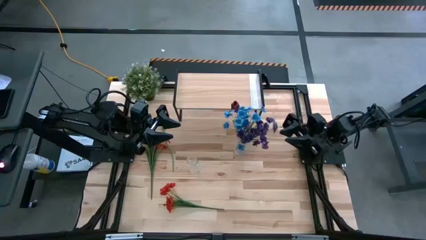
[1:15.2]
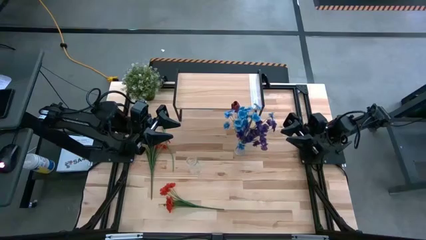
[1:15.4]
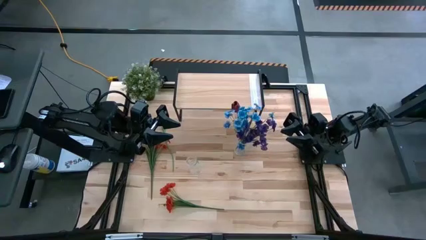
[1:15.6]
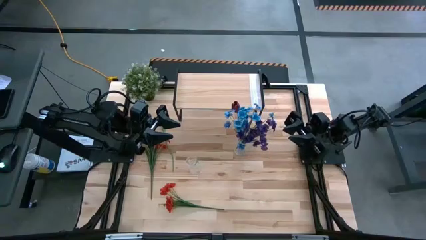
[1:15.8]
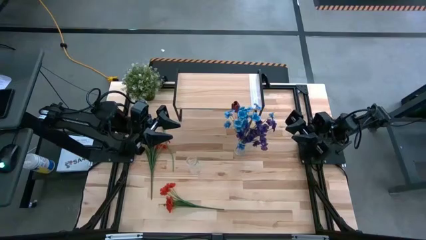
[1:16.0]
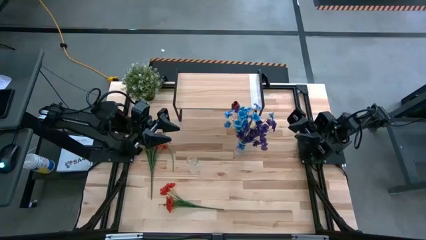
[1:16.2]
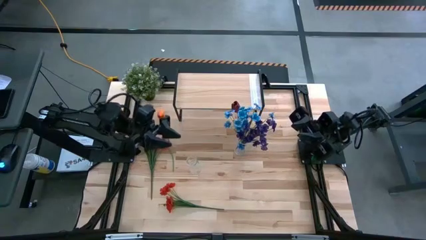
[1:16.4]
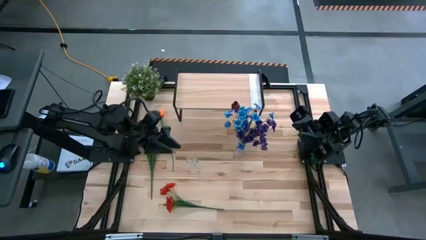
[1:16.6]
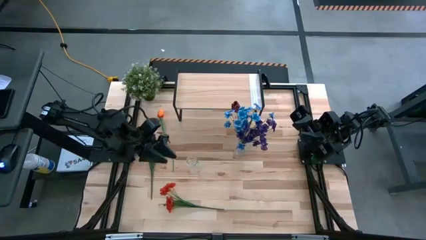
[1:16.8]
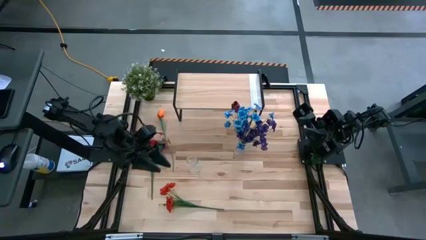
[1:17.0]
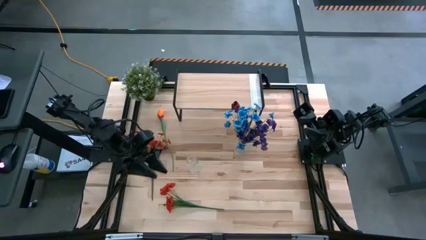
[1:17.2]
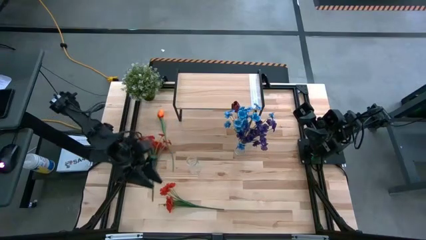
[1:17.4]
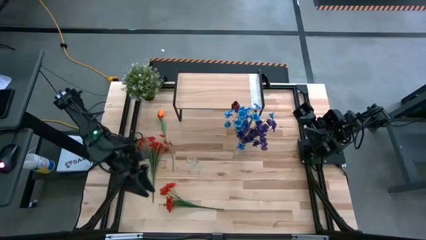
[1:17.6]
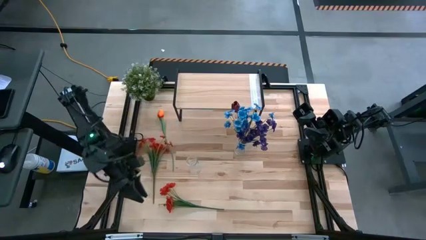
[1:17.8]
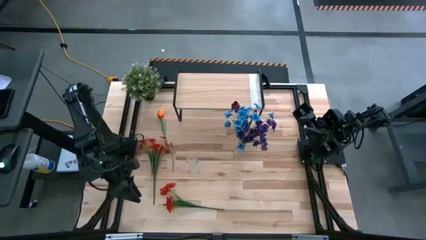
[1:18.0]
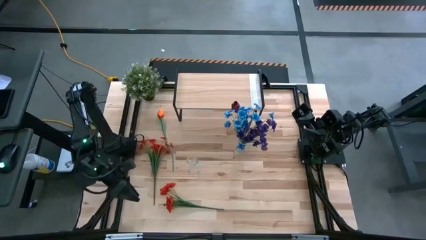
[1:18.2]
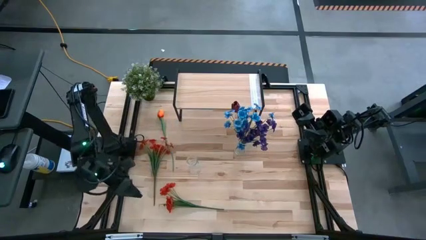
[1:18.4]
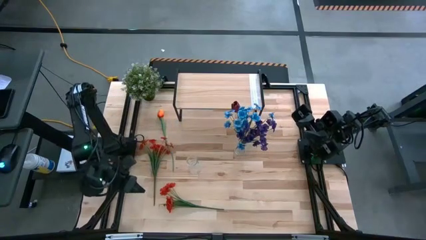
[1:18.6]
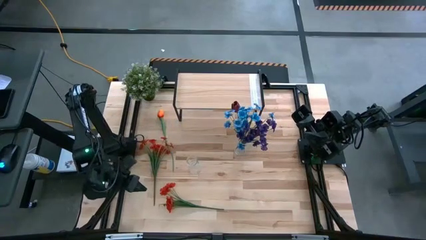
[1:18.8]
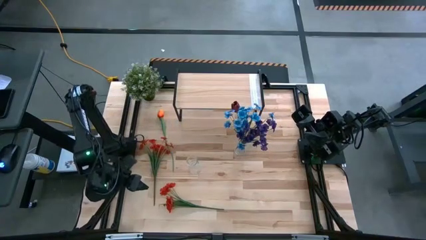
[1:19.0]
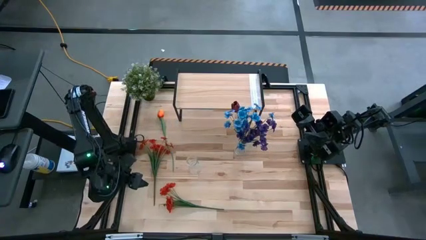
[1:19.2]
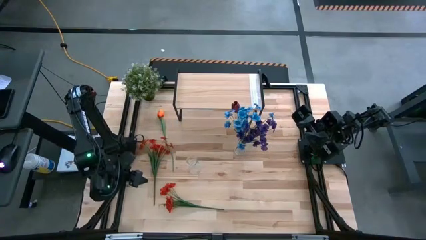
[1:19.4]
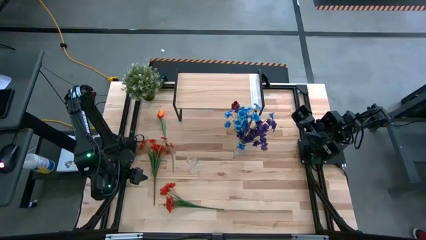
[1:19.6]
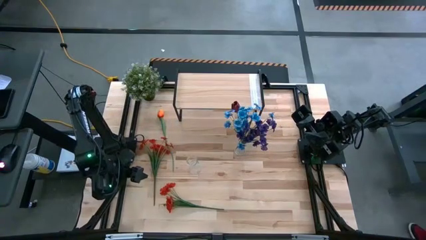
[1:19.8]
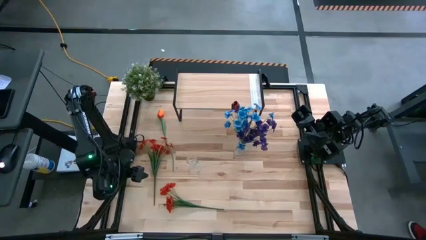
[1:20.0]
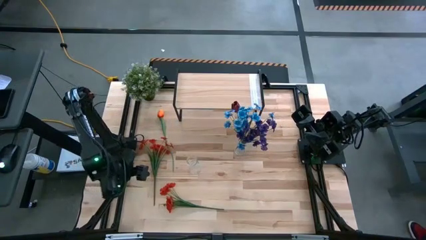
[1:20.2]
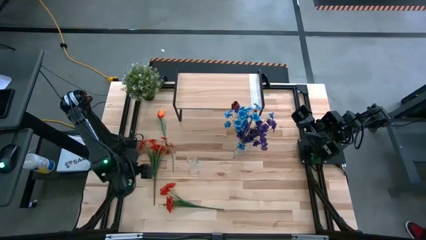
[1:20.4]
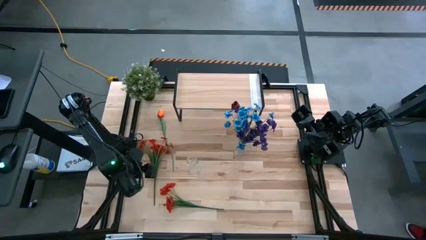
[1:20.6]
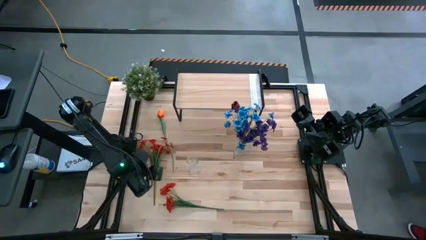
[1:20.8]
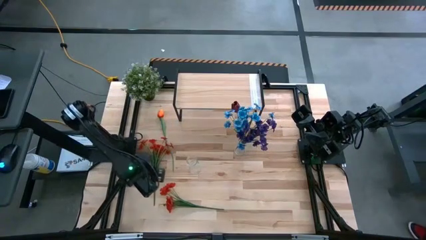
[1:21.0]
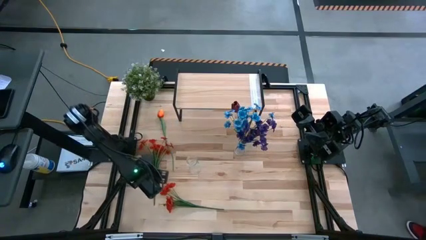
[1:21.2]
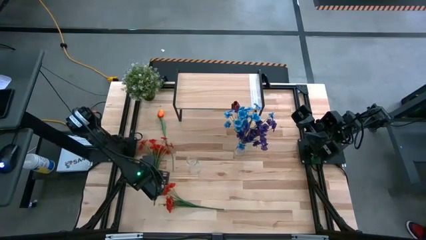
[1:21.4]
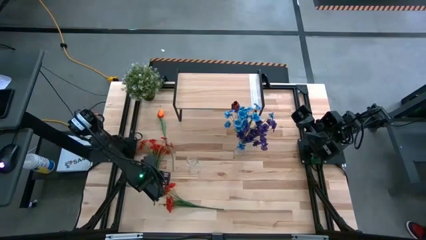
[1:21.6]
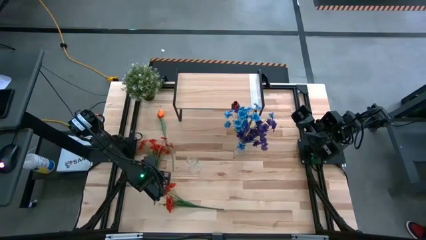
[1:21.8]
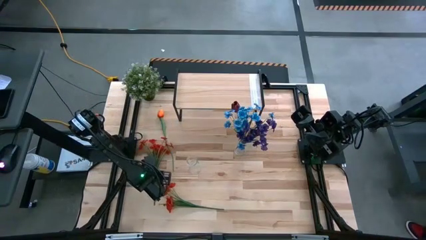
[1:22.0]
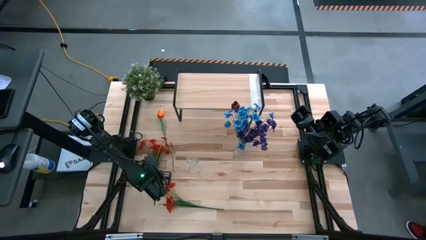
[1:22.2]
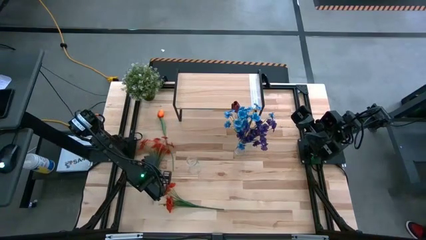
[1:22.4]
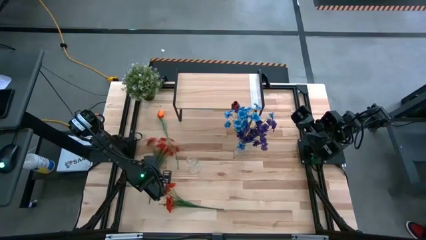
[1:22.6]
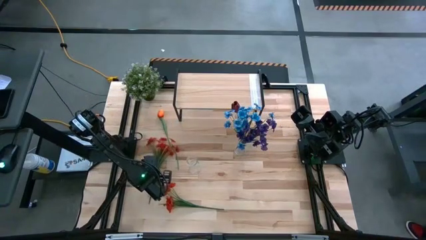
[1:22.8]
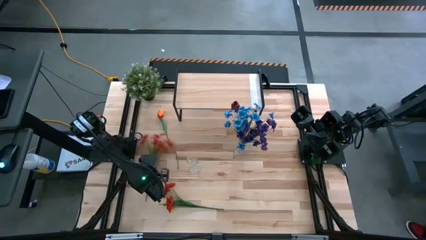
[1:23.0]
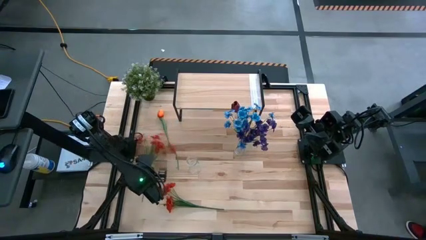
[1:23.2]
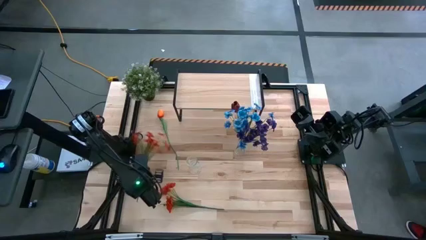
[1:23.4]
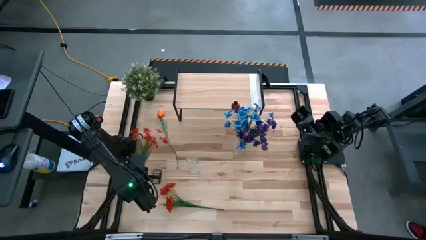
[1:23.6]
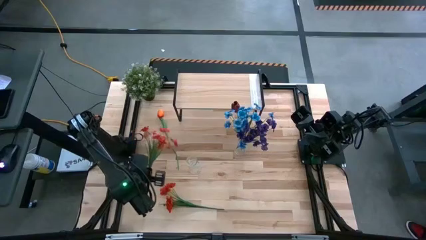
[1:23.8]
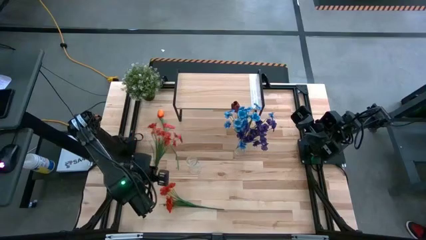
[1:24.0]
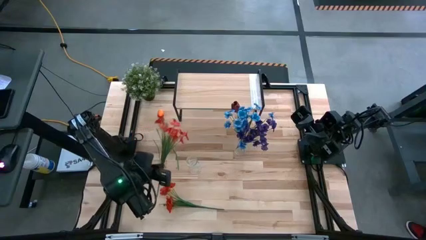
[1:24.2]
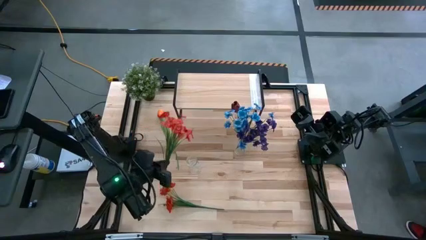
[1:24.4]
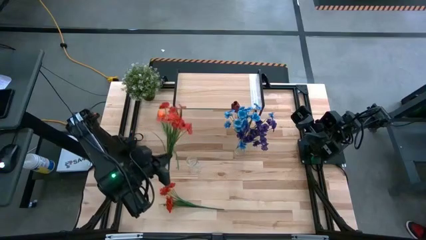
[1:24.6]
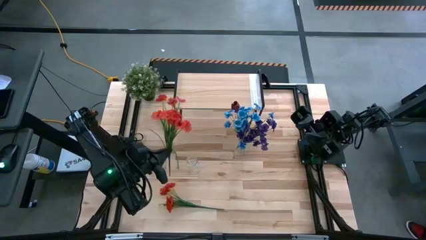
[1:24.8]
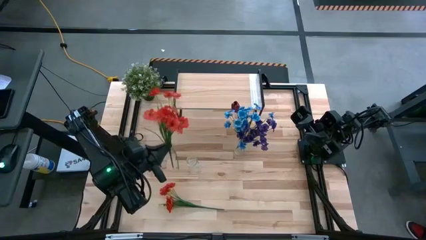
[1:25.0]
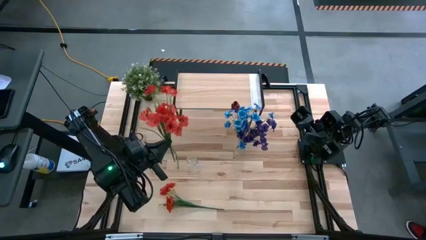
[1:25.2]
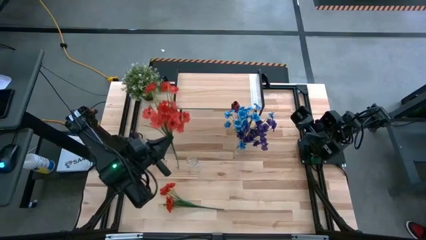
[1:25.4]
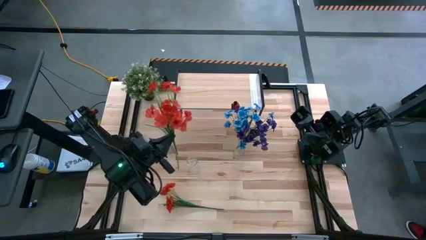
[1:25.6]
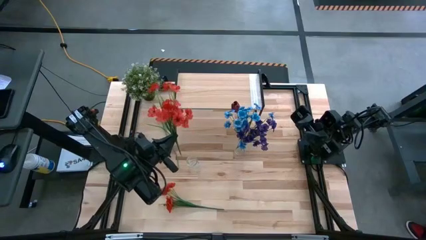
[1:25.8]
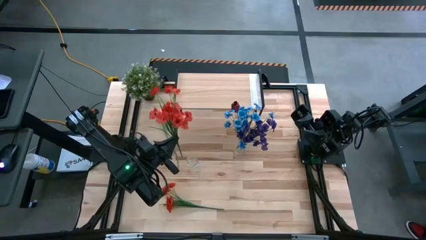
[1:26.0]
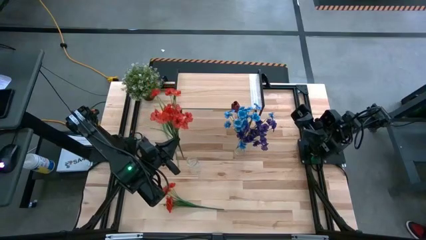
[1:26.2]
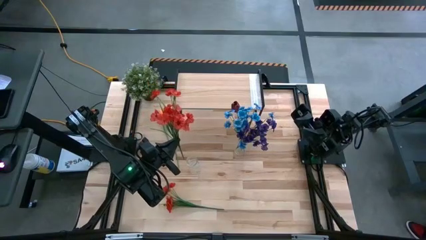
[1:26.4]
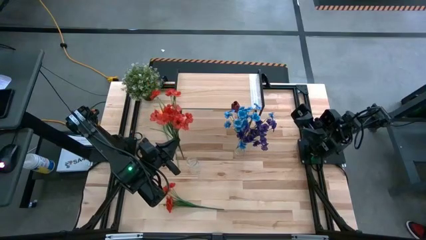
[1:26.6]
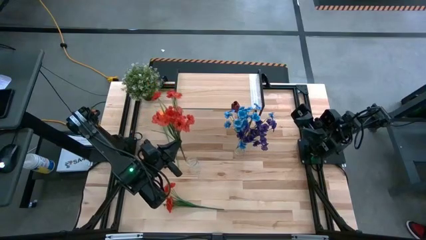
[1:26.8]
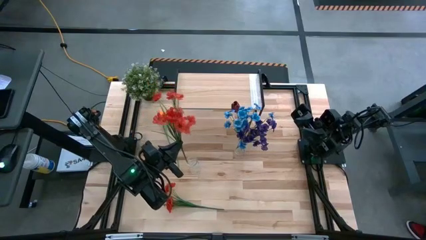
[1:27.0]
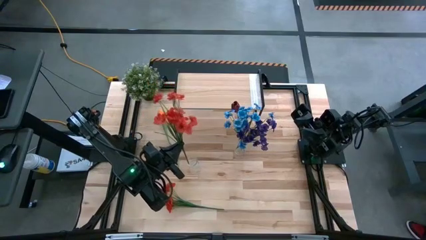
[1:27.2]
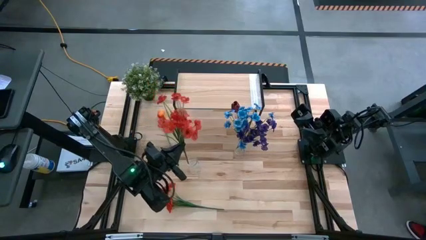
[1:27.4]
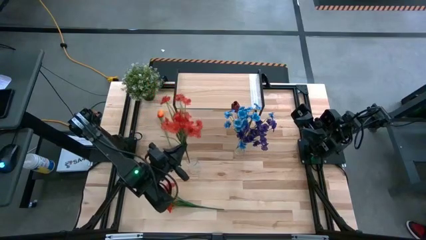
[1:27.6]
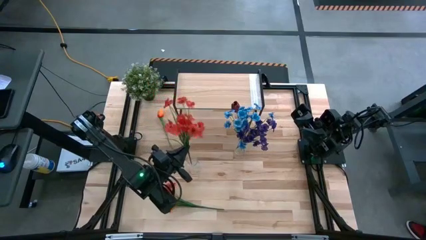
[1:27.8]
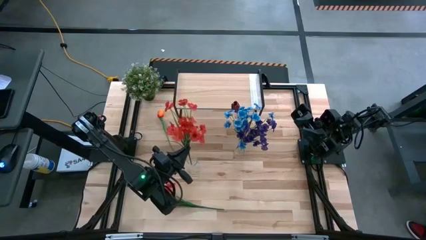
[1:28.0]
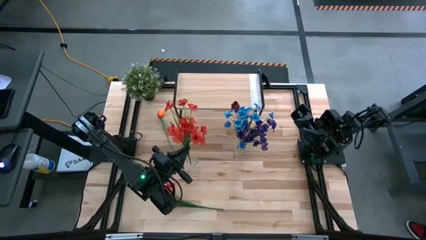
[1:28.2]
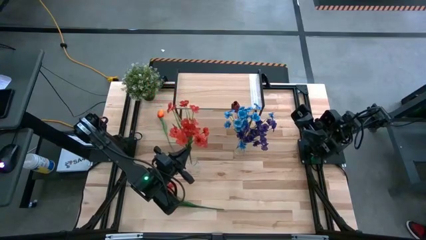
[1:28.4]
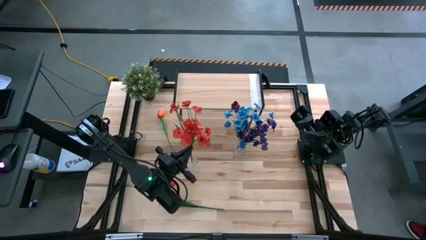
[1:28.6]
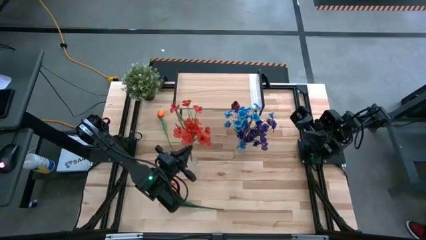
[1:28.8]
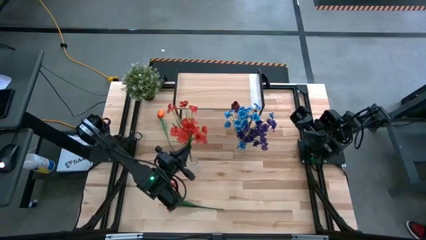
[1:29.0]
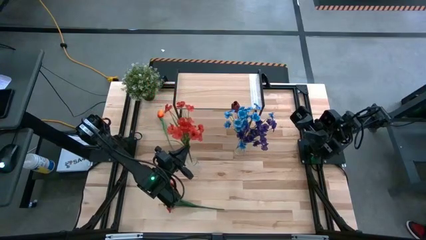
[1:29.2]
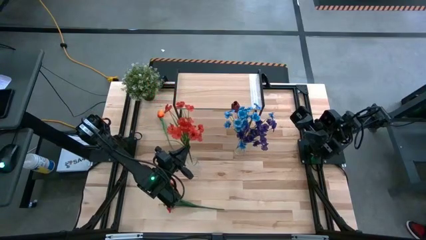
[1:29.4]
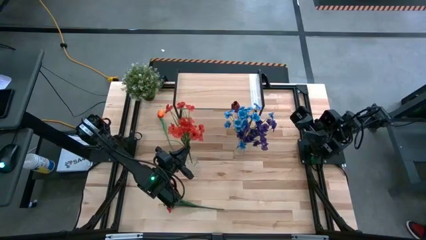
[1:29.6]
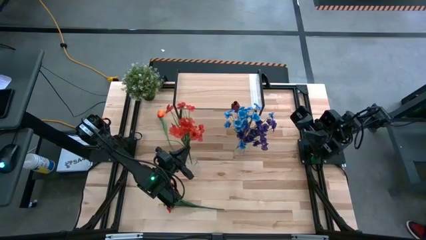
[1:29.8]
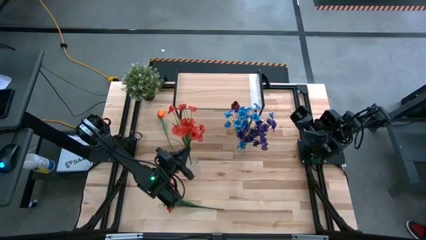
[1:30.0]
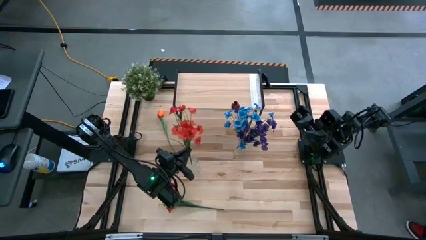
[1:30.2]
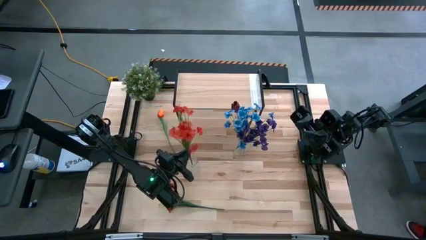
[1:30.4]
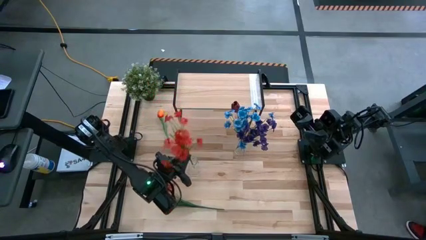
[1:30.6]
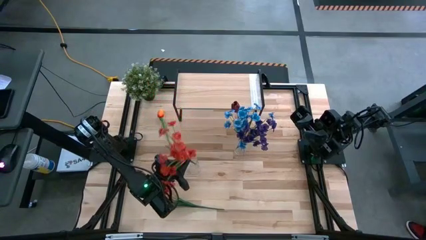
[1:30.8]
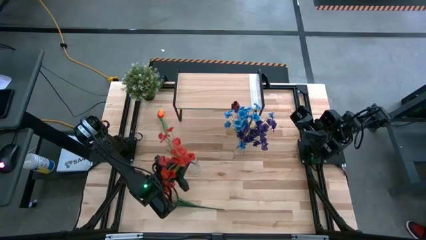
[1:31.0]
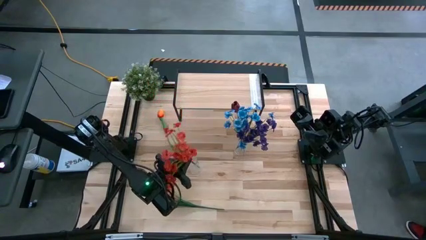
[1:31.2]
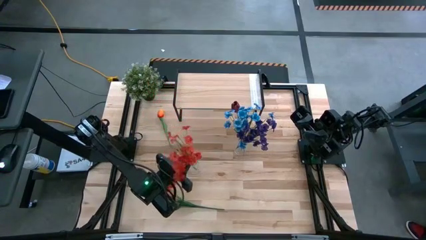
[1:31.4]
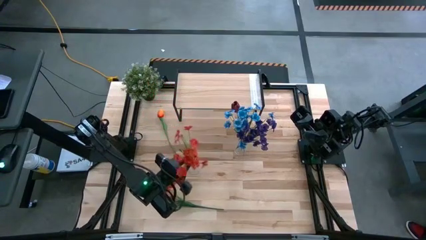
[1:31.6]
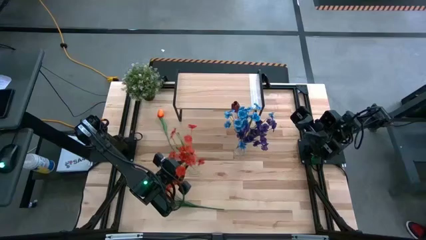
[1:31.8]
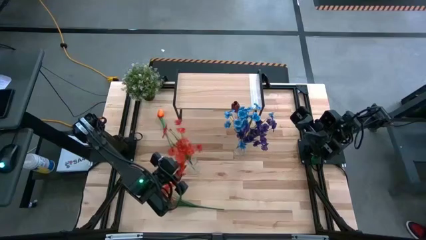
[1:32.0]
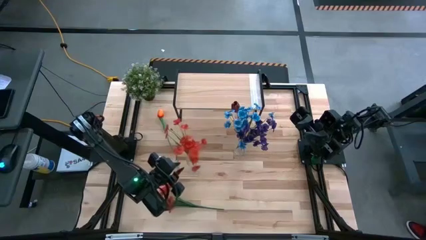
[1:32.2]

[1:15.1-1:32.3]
Task: Pick and place flowers into a vace then onto a shelf
Put the top red flower into the left transparent vase
